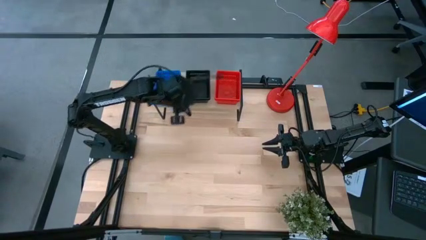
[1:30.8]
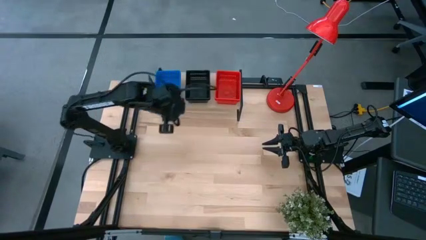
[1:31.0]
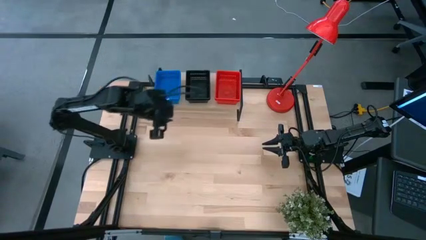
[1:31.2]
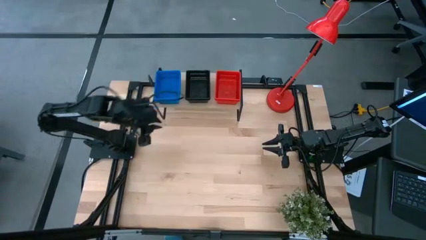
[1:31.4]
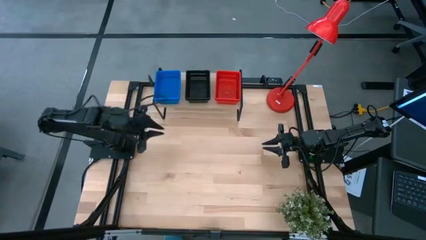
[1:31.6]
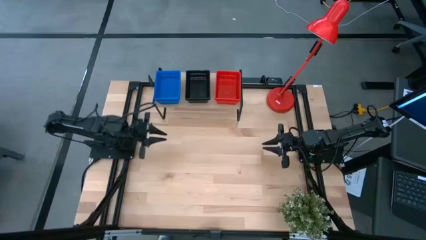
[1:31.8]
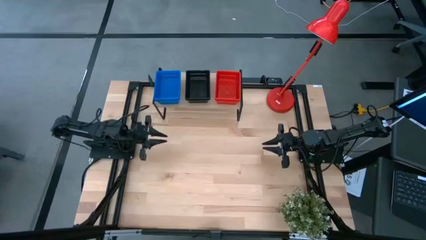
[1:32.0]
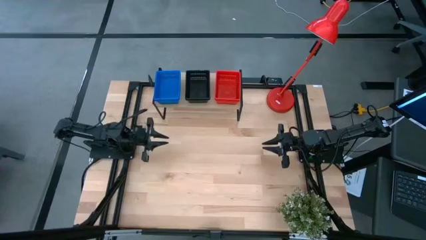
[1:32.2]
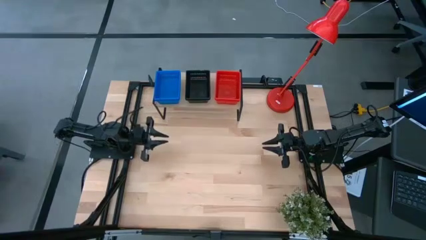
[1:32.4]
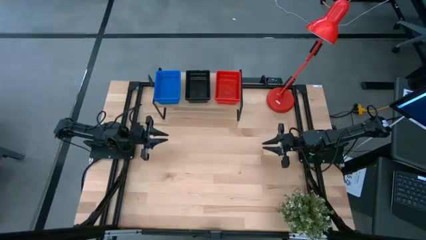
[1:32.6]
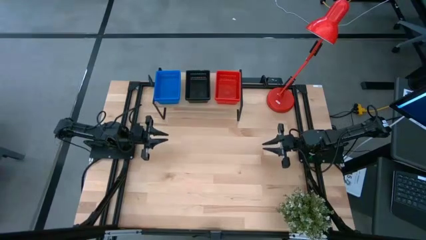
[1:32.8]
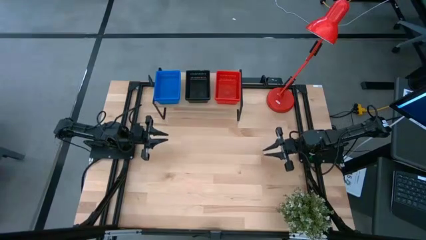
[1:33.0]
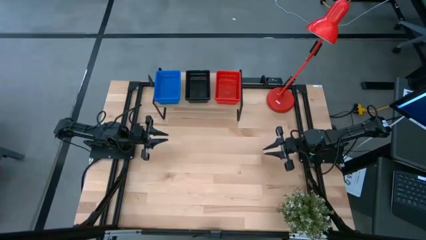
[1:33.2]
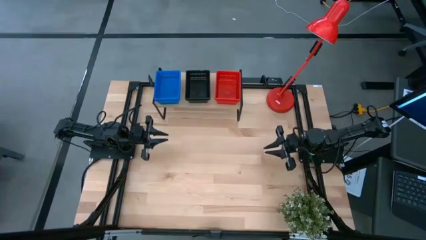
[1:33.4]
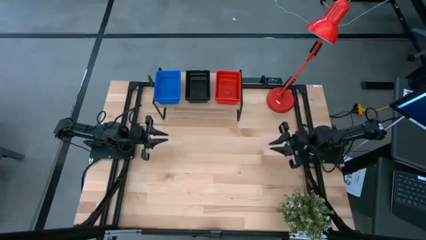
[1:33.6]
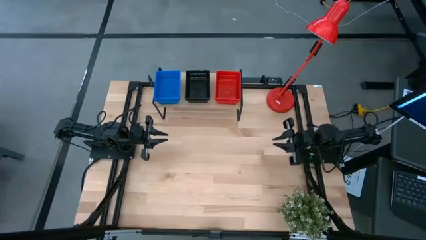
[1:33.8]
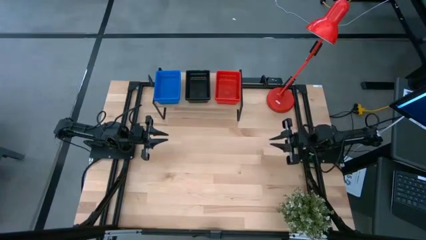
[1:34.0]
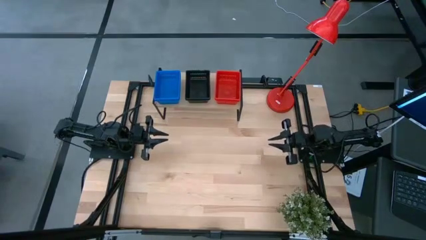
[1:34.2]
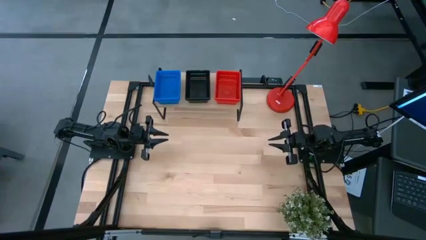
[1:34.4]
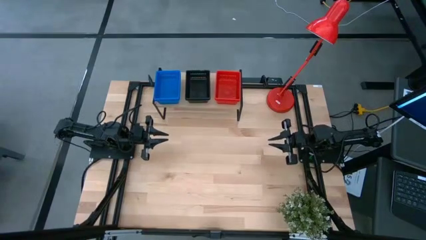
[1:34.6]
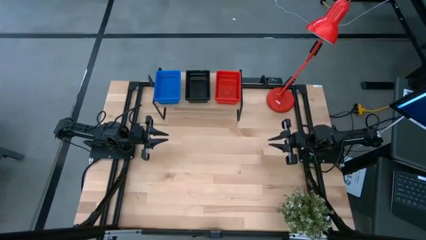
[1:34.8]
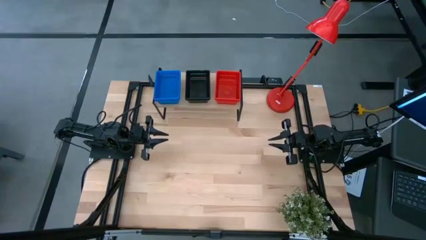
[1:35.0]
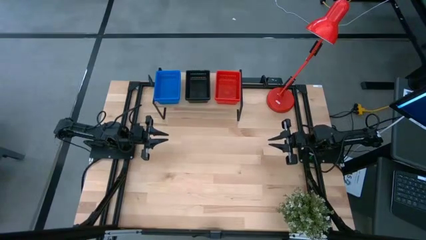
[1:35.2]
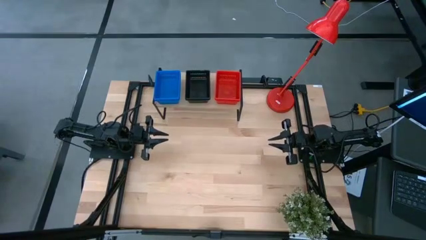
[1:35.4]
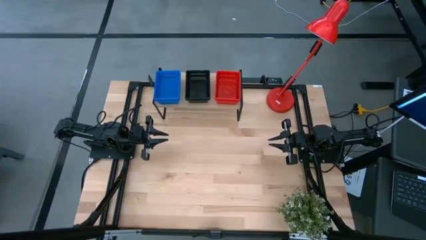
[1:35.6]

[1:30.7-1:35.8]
Task: Stack baskets on shelf by color
Return to Home Position

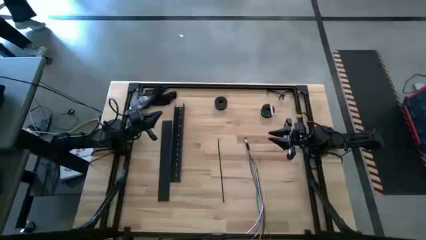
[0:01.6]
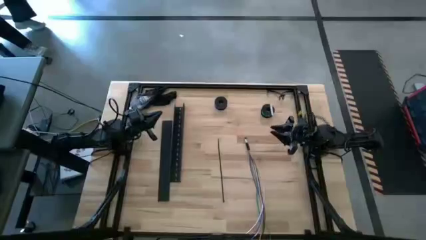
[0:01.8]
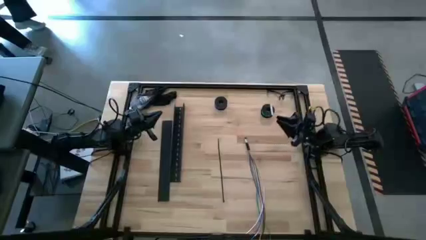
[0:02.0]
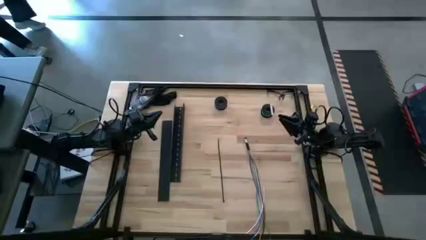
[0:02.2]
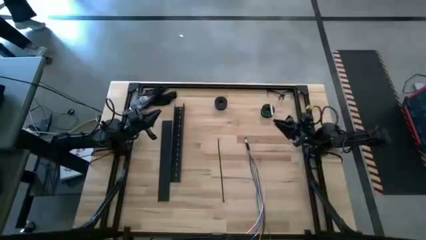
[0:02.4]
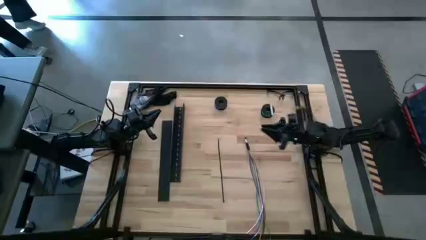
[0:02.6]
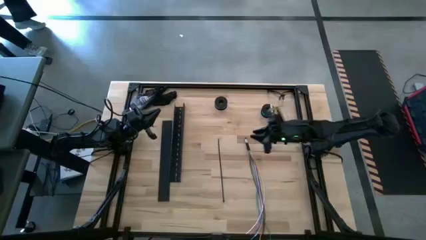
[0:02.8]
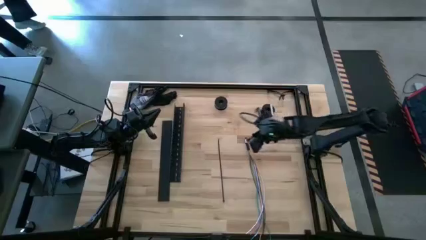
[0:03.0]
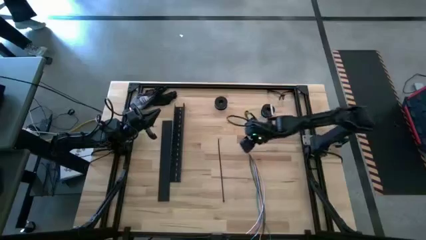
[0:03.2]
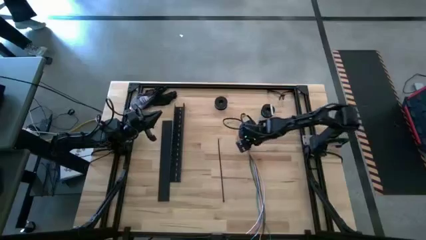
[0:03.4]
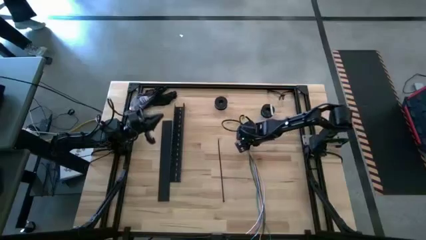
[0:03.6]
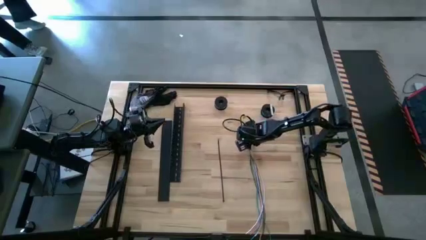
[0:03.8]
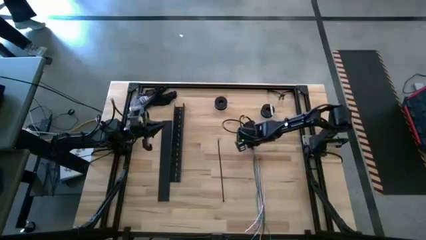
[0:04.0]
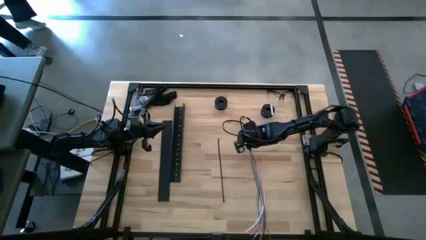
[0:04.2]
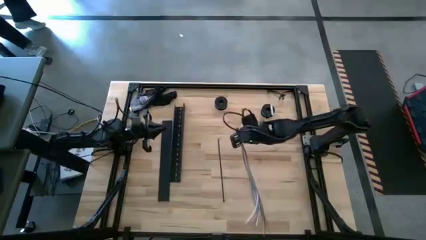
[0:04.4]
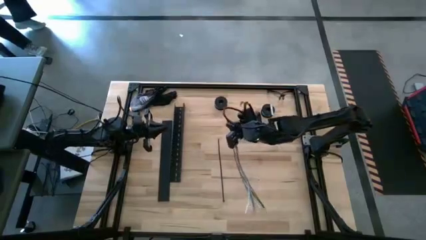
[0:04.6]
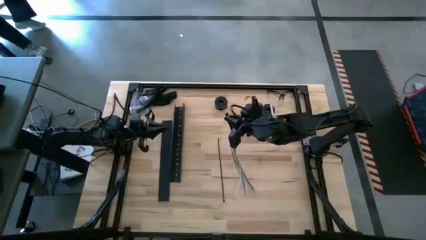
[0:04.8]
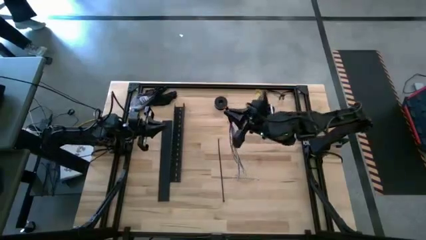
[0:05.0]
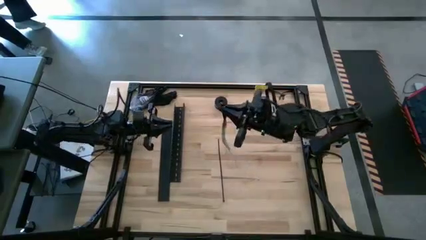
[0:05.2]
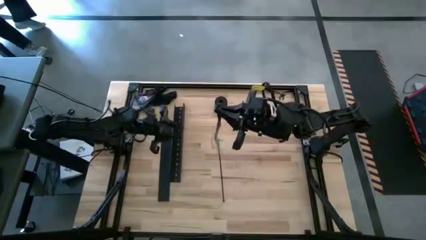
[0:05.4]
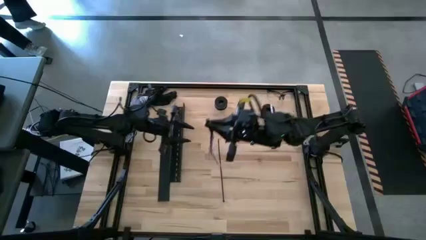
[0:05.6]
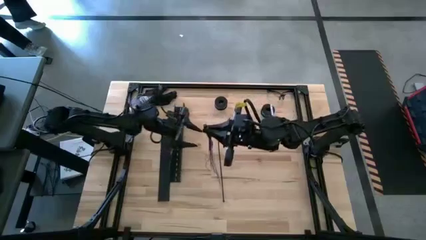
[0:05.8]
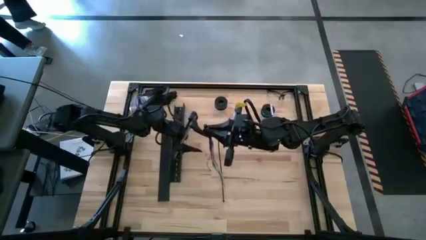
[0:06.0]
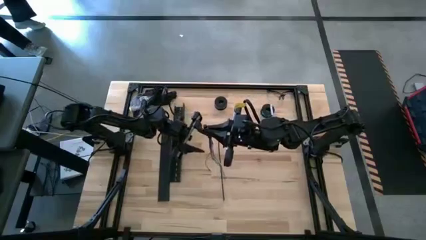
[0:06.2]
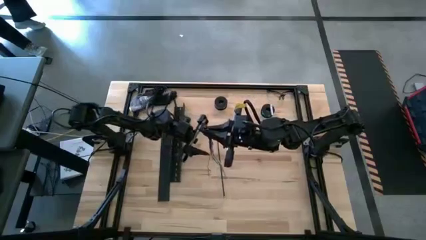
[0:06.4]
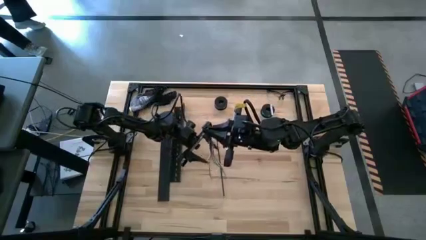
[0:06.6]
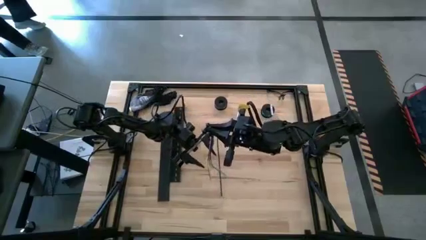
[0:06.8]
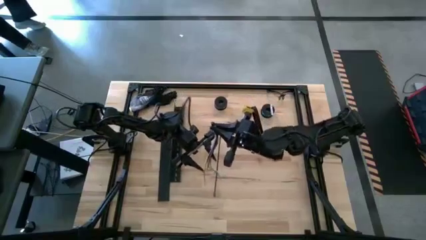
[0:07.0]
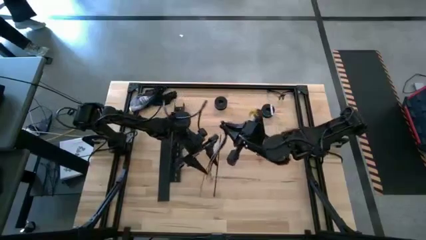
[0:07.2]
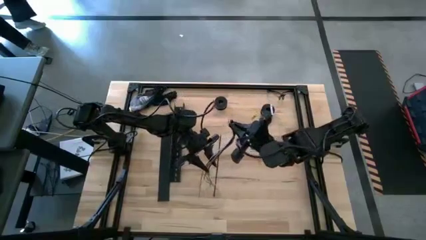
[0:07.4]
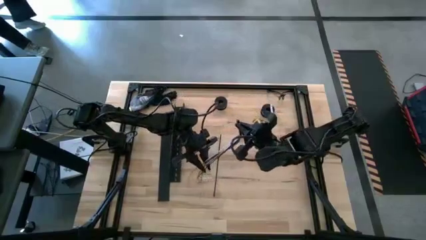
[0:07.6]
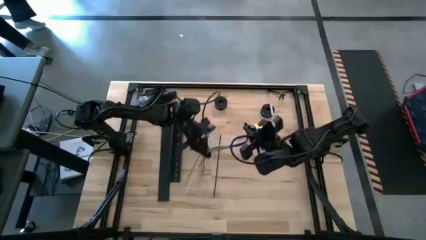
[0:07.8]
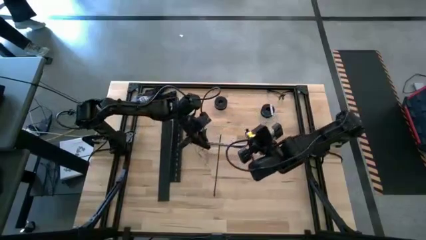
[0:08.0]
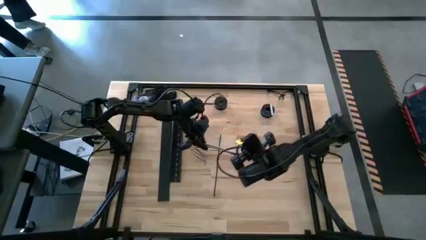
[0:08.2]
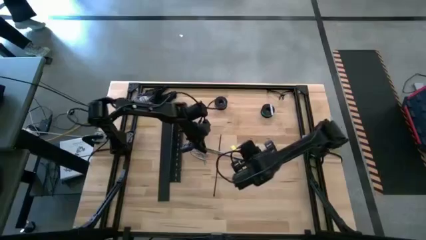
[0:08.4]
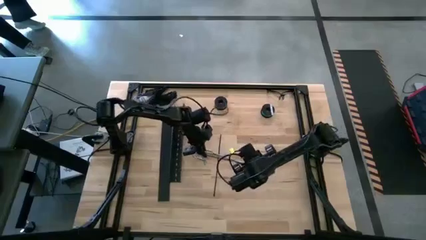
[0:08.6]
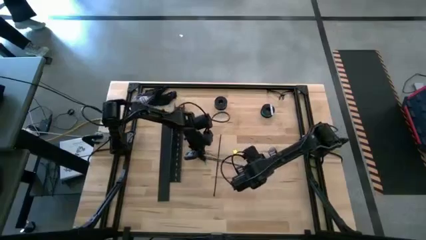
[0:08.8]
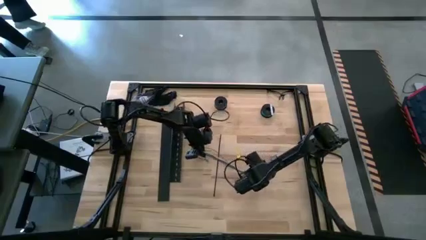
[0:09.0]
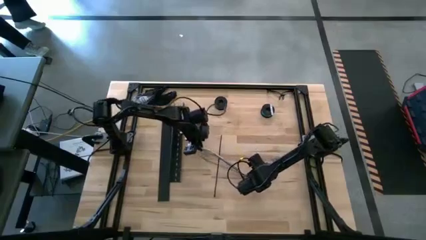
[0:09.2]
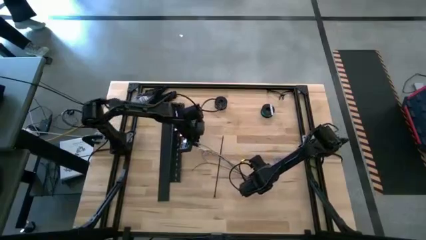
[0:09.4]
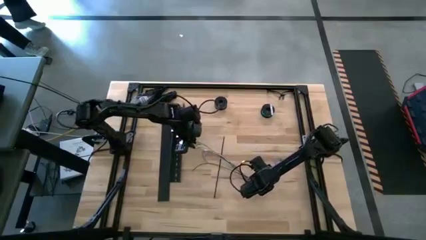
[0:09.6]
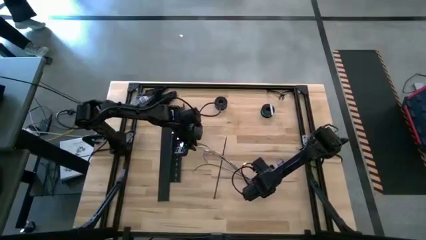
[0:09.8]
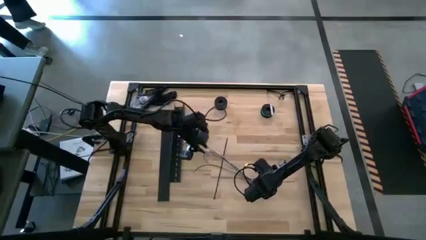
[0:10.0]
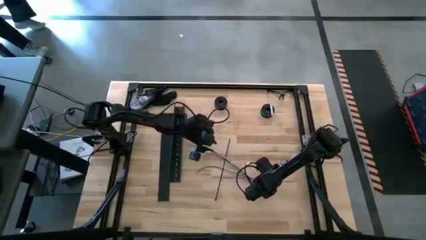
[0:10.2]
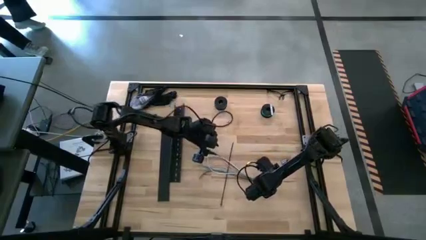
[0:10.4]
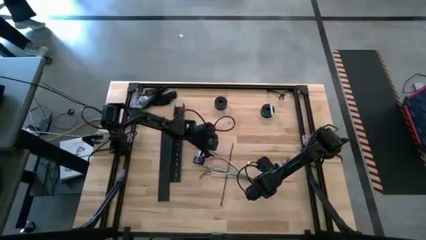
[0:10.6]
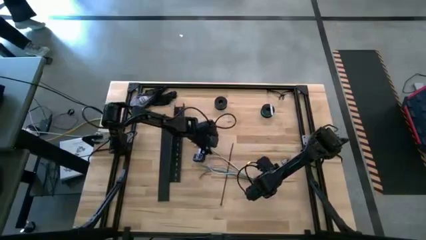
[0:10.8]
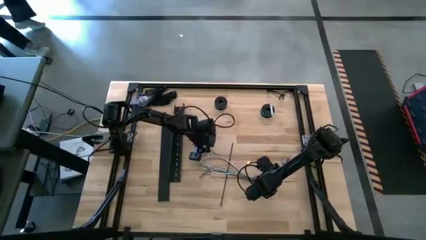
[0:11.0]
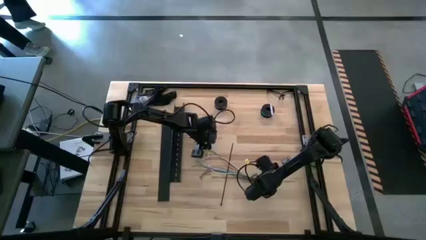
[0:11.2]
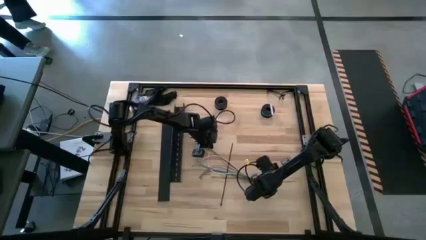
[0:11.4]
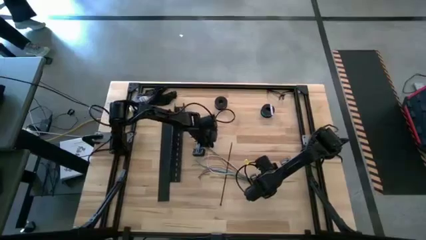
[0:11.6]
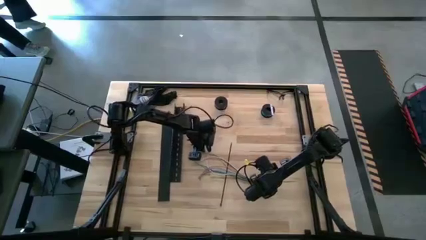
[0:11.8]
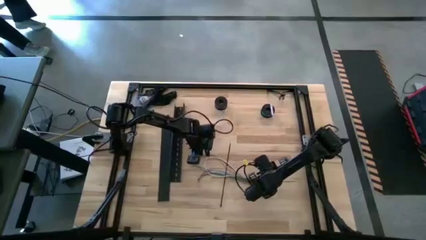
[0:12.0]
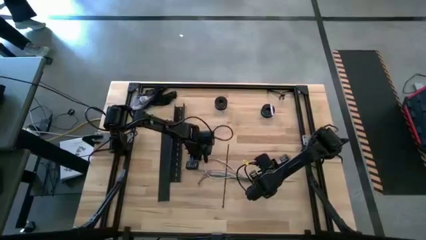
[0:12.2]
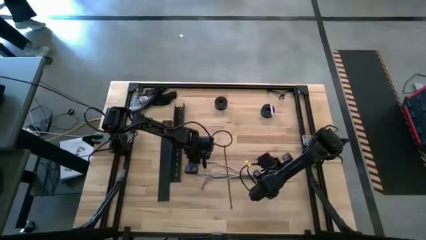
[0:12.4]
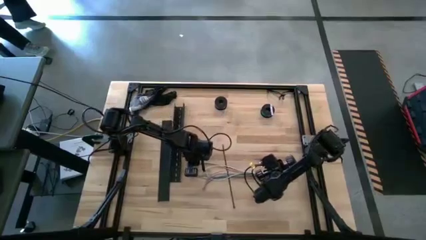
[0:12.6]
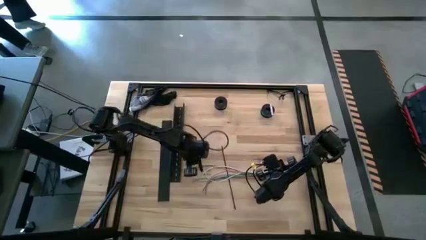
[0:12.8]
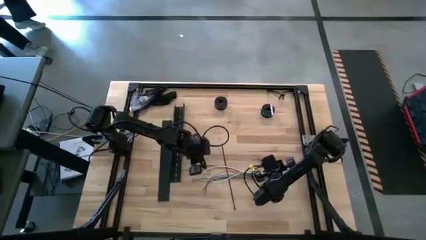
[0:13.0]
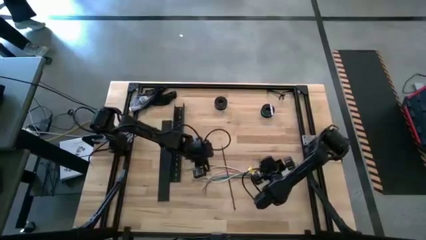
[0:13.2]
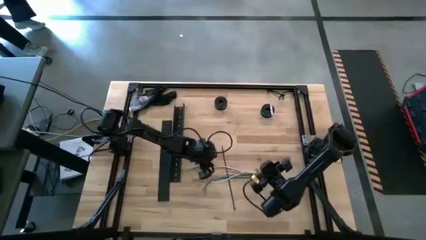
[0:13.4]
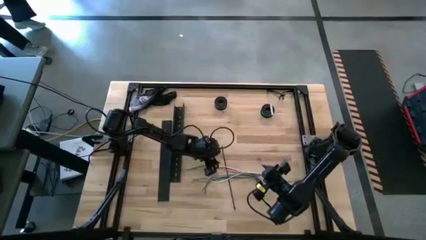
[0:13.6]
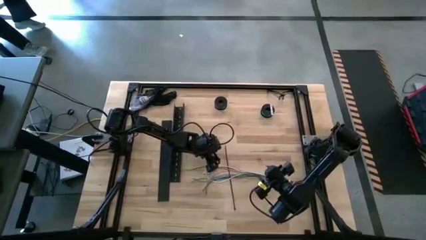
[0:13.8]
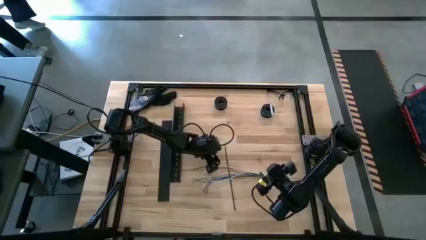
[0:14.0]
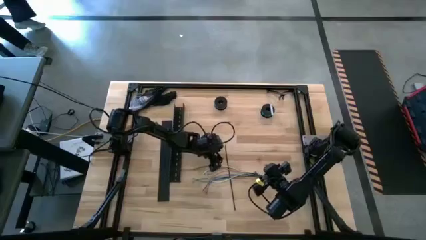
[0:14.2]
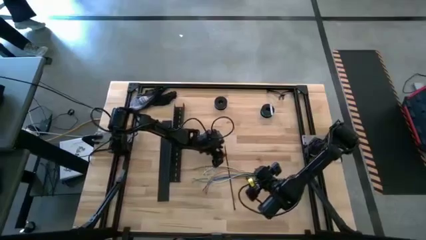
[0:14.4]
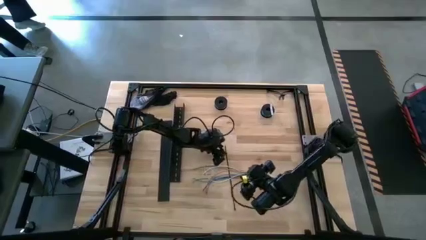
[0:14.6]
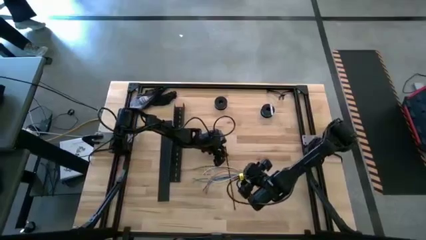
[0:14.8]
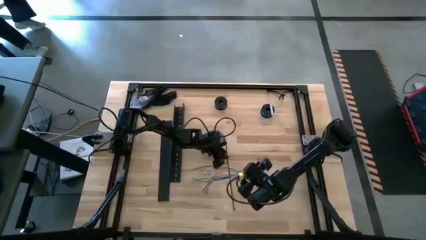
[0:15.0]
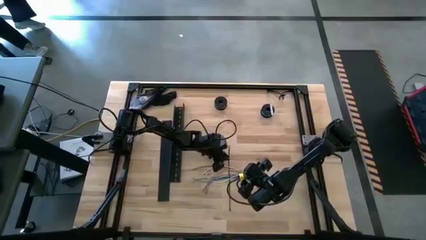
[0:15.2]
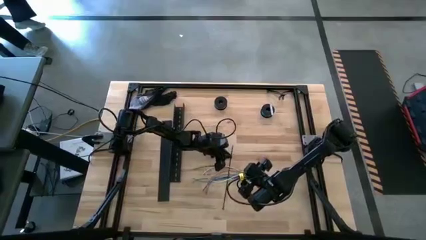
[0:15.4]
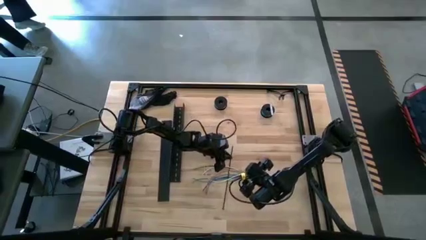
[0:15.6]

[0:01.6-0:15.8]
Task: Ziptie cables
Wrap the black zip tie on the cable
